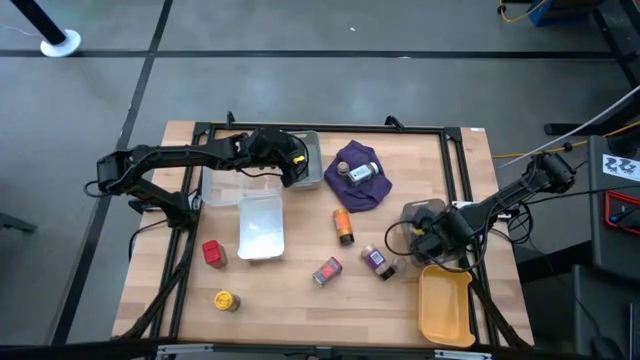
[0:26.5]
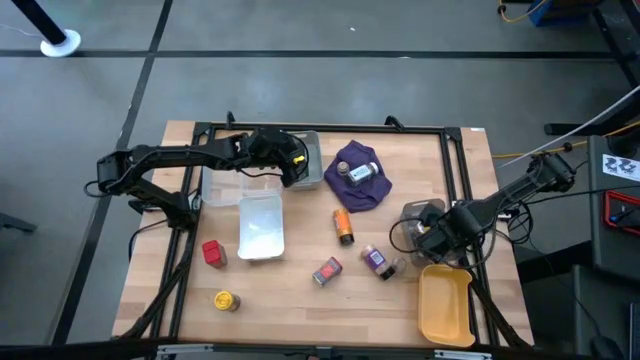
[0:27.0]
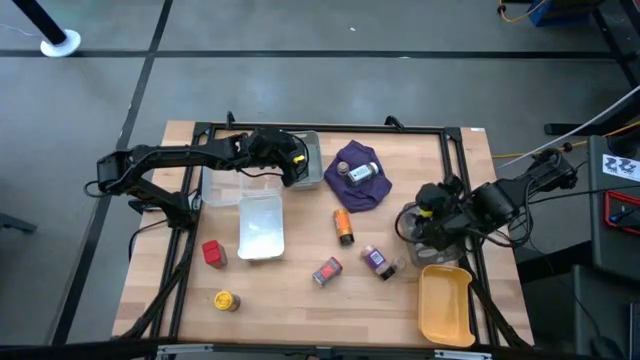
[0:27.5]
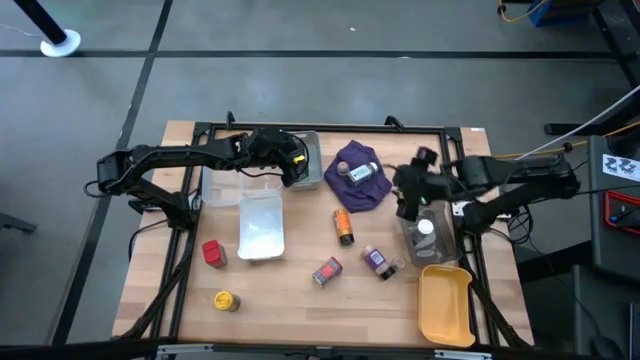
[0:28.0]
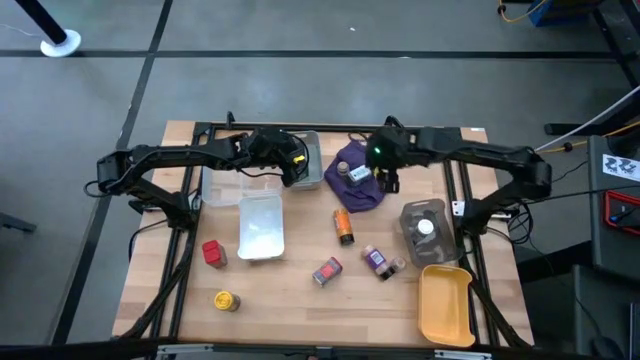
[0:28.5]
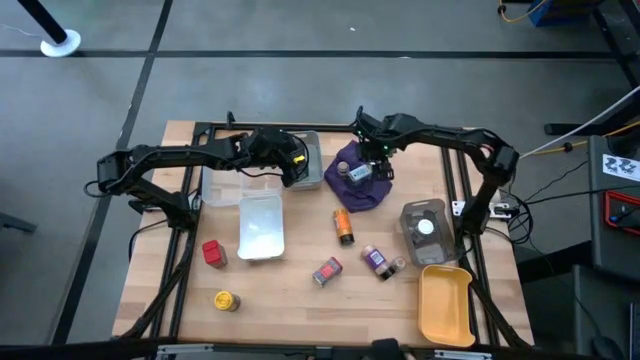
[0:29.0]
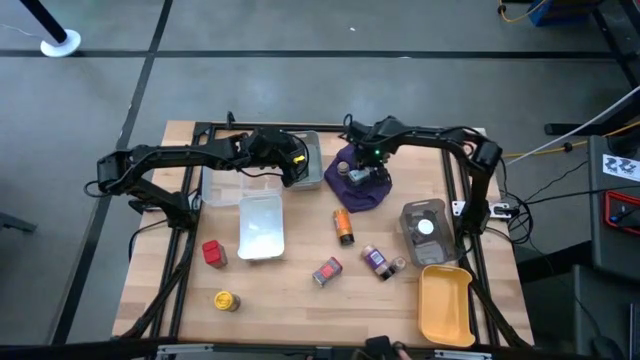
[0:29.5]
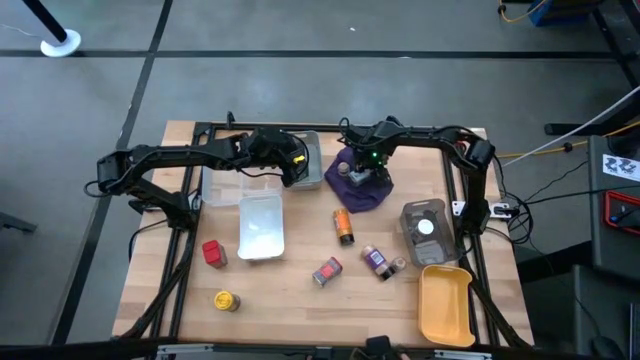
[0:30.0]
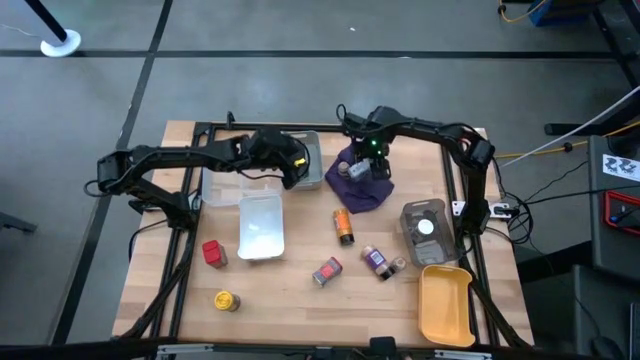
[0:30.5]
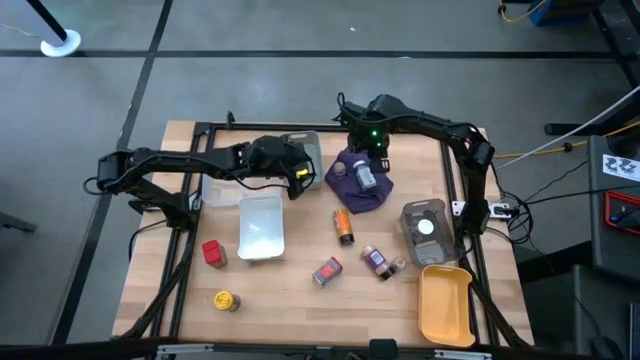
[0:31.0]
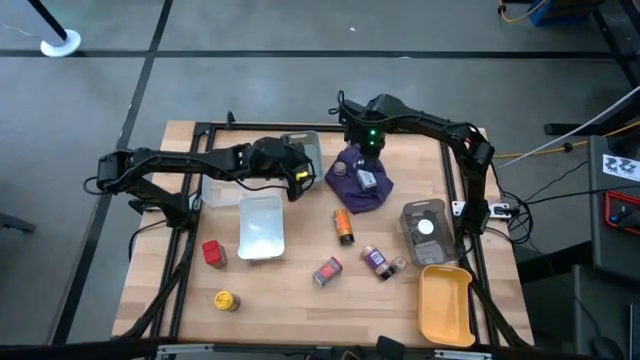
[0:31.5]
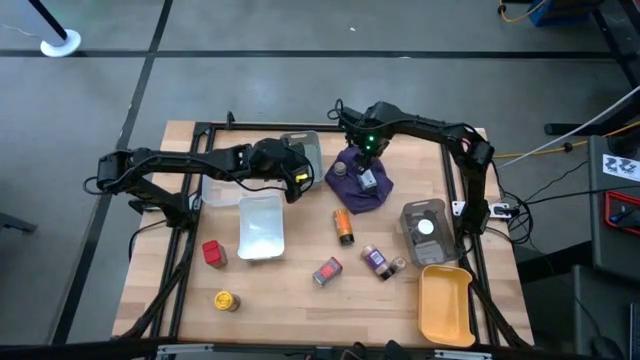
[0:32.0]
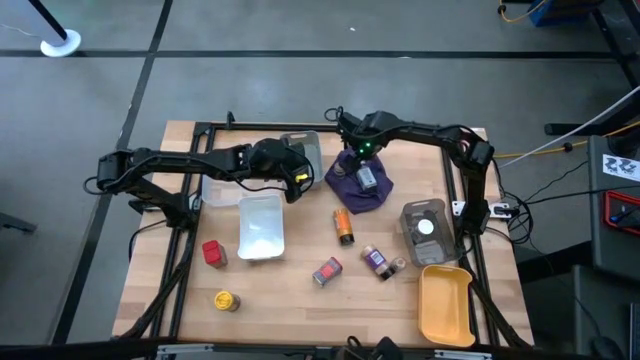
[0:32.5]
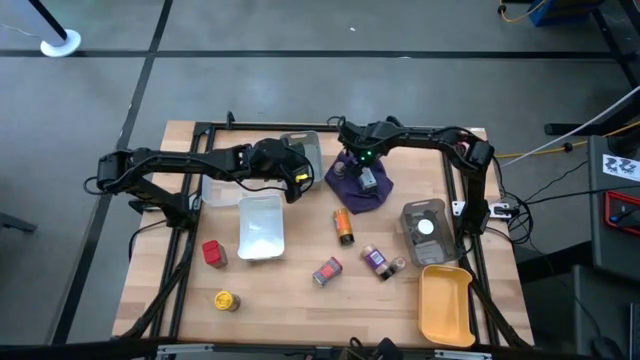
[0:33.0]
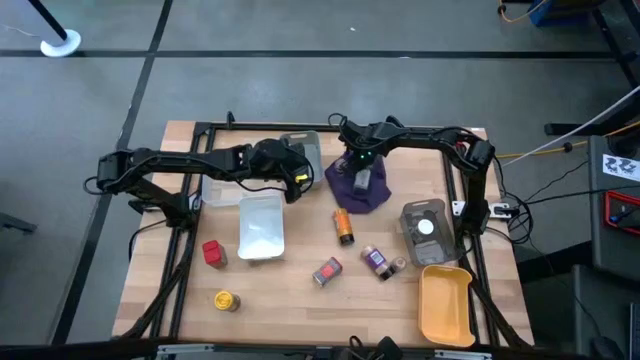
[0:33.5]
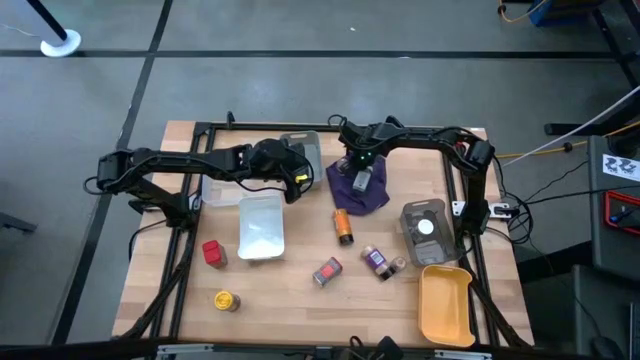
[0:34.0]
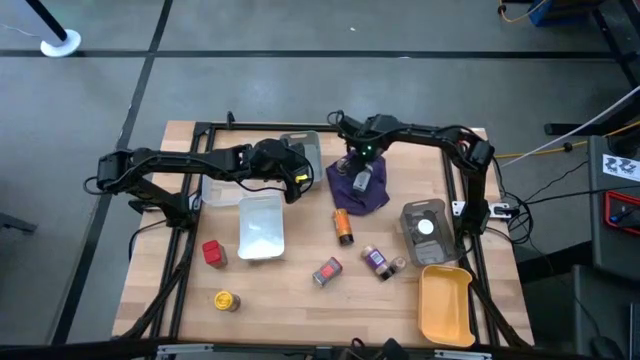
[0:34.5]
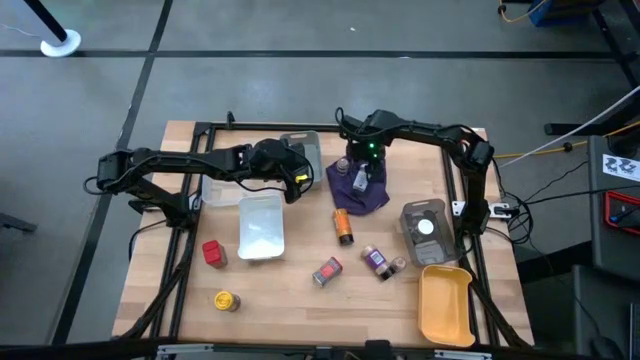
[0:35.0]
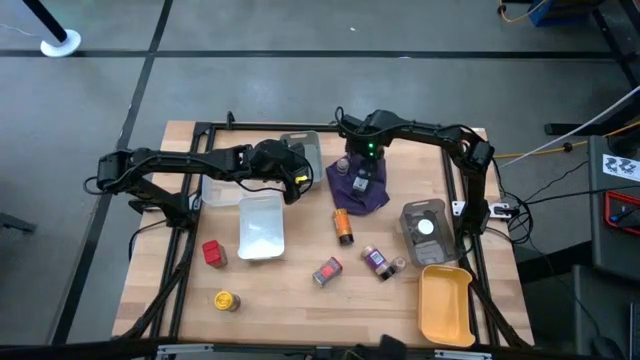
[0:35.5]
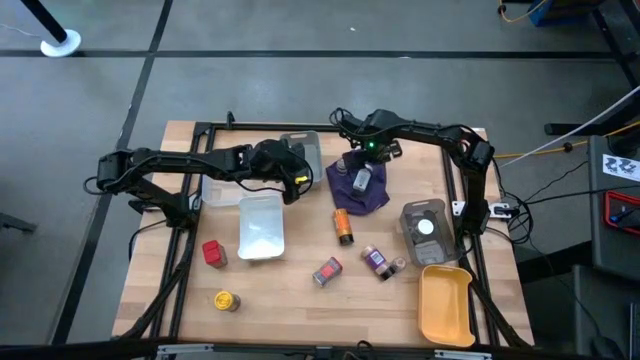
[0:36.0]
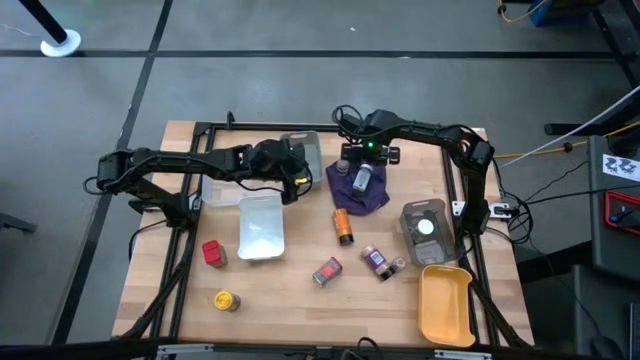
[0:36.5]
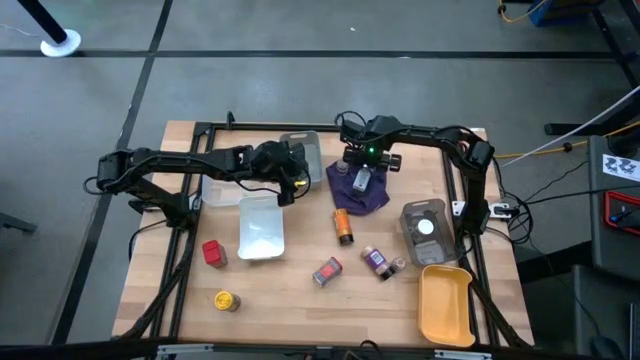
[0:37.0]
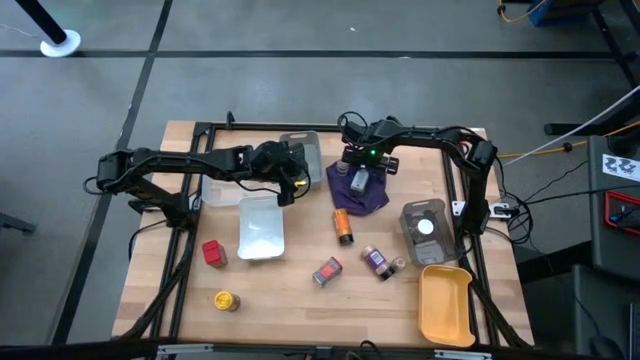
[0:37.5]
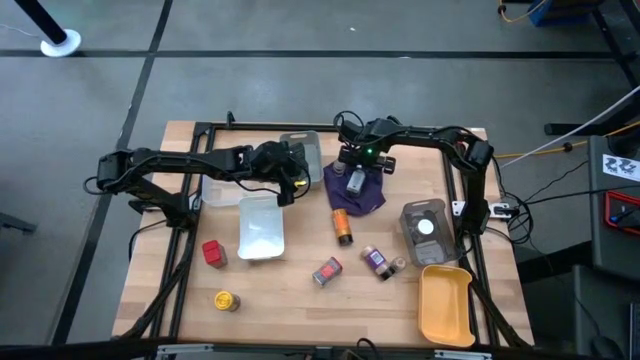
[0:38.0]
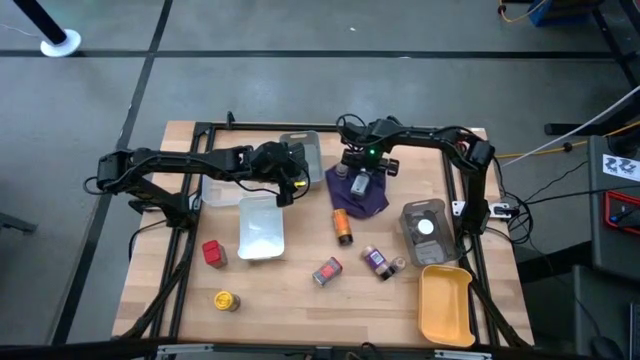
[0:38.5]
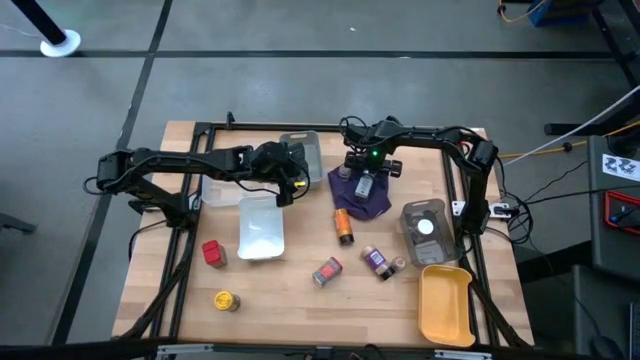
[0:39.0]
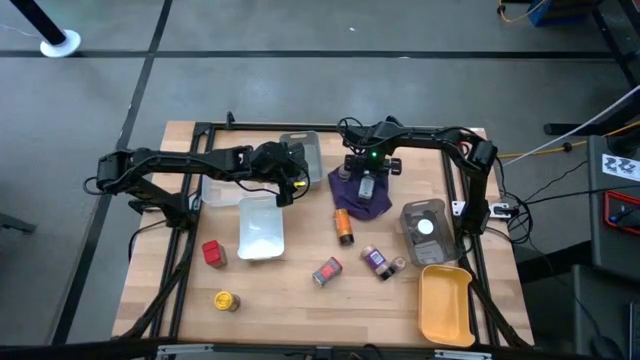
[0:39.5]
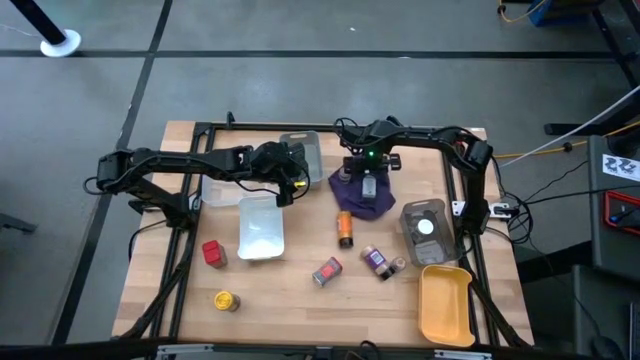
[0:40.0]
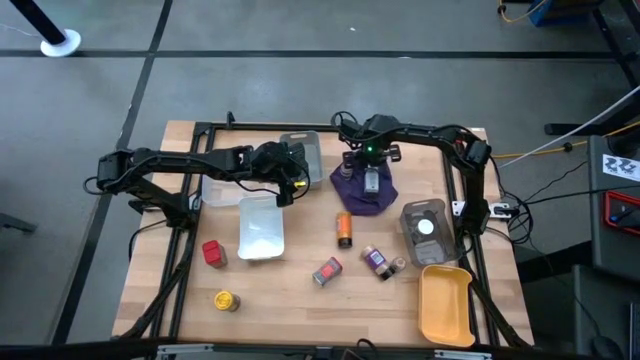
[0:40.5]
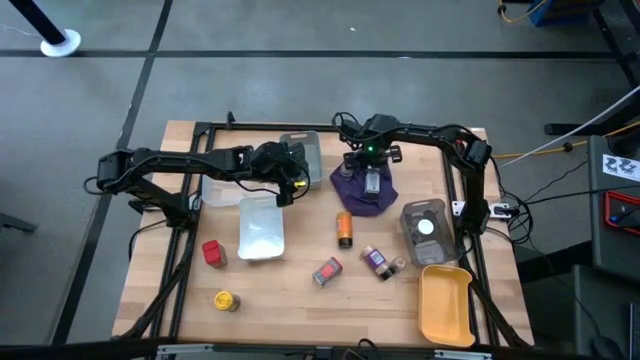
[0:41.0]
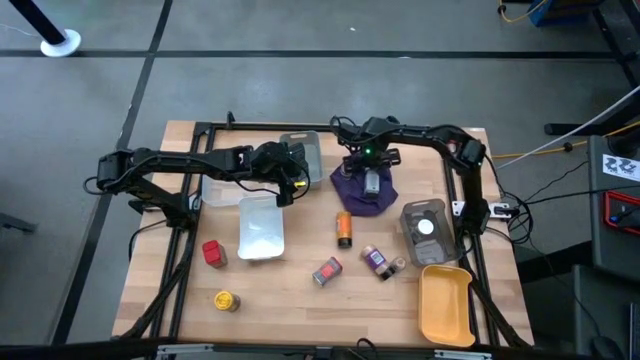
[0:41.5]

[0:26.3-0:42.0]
Task: Sort spices by type
Put the white seasoning bottle into the black transparent bin

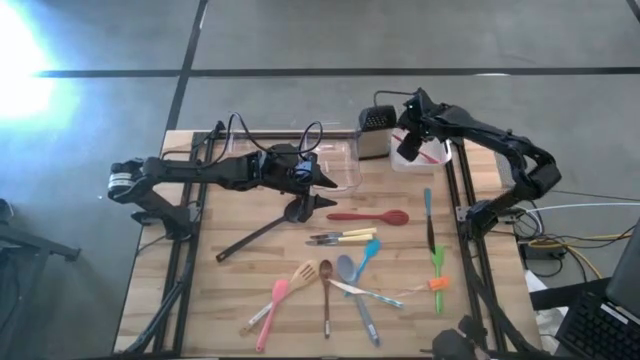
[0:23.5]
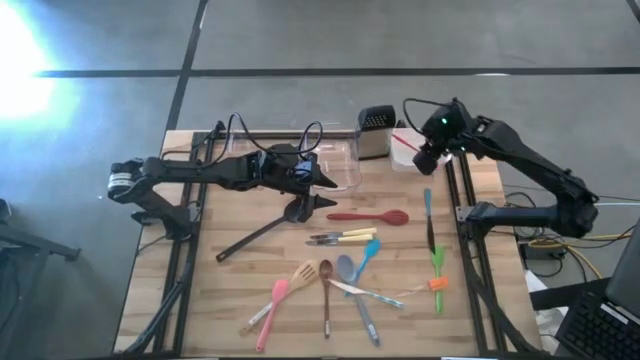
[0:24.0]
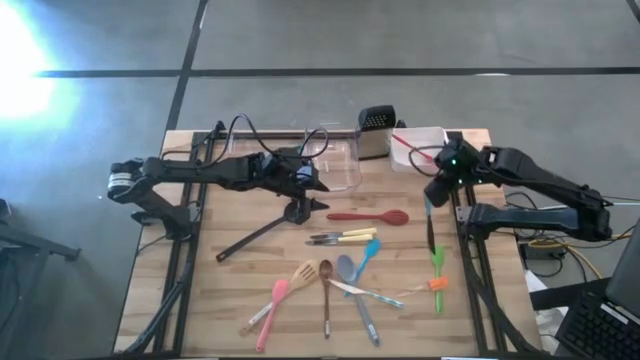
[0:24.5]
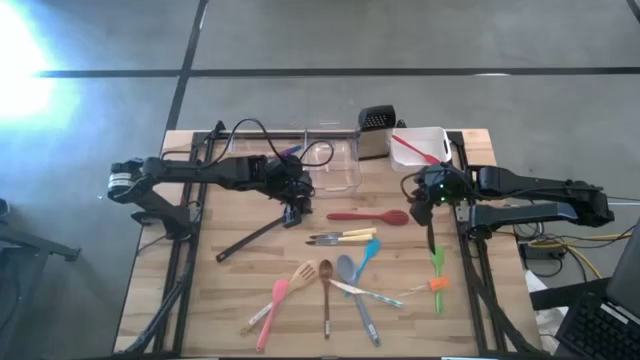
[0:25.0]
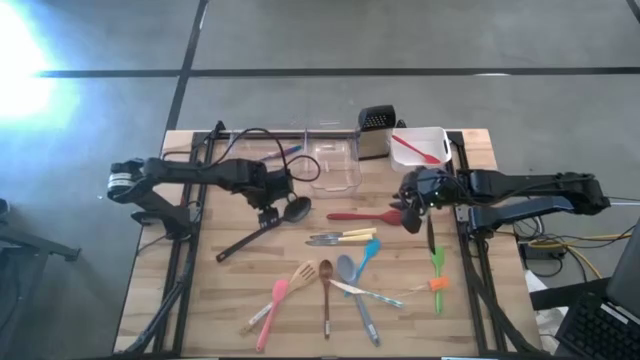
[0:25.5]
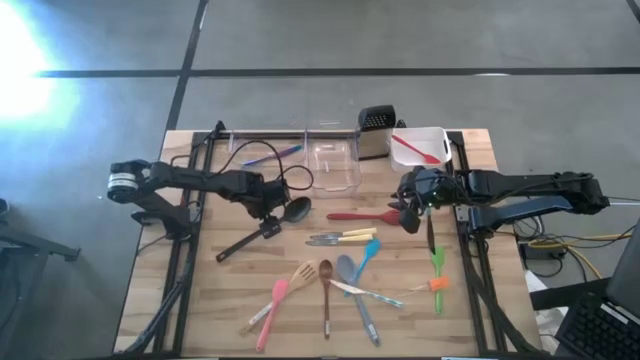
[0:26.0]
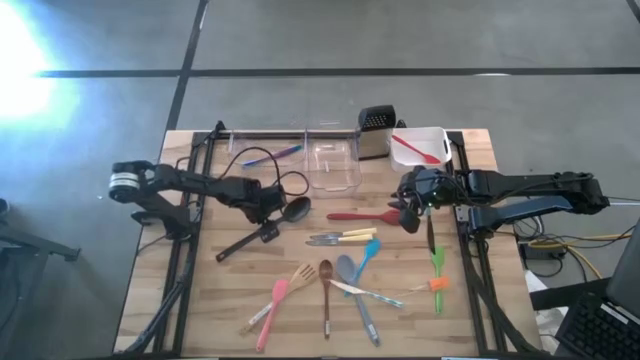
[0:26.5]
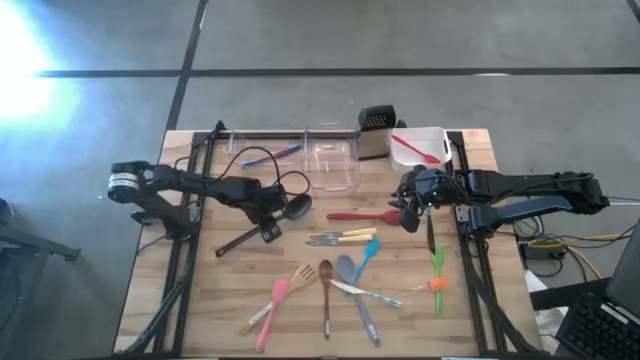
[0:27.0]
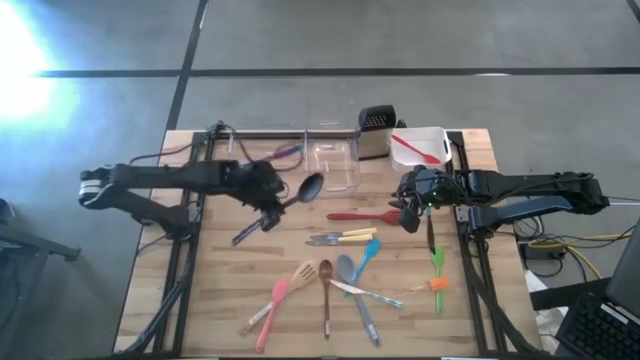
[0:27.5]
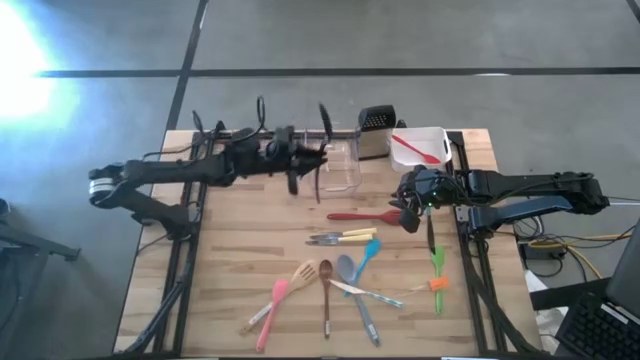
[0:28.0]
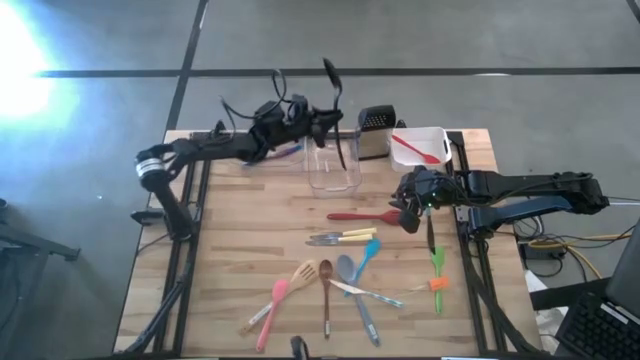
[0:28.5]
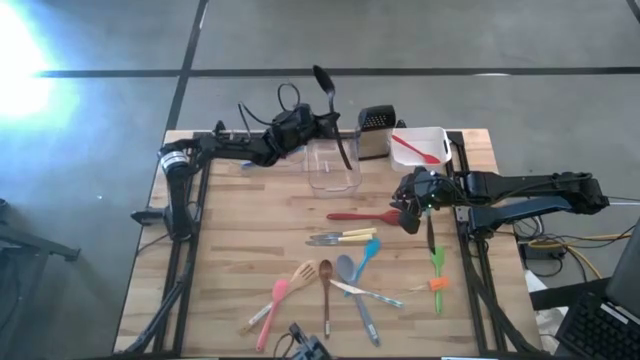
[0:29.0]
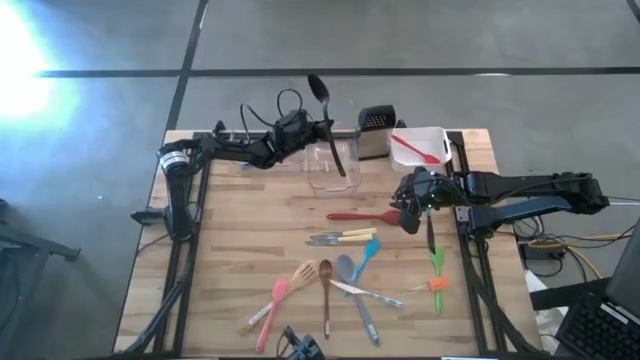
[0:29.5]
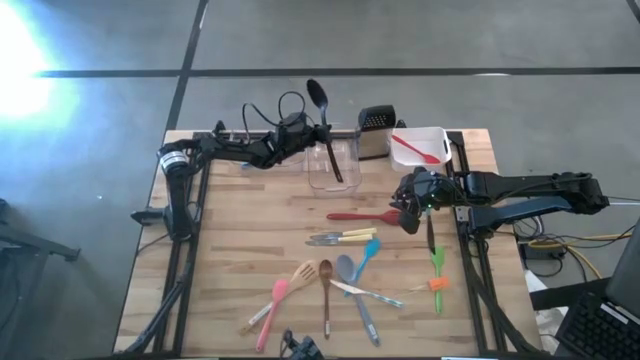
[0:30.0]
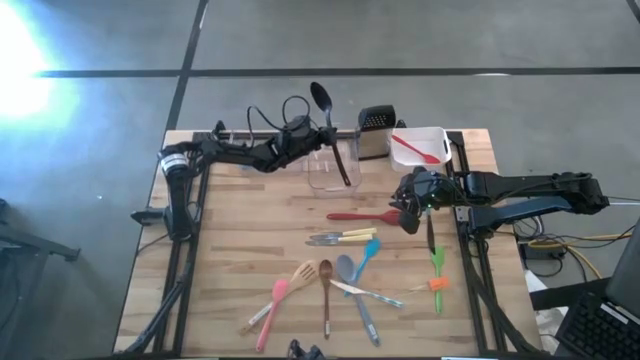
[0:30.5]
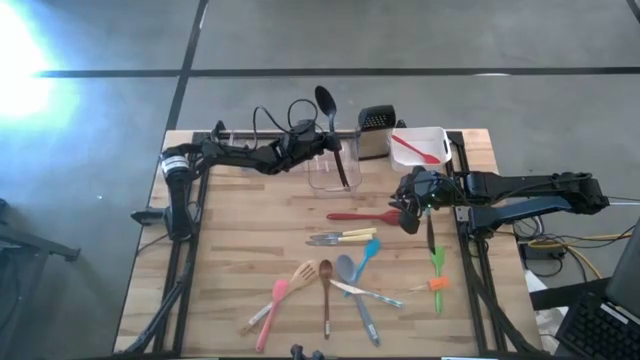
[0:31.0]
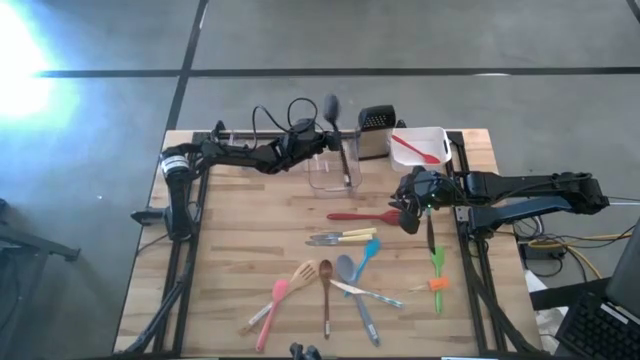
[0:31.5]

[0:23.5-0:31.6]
Task: Pick & Place Kitchen Items
Put the black serving spoon into the right transparent bin
